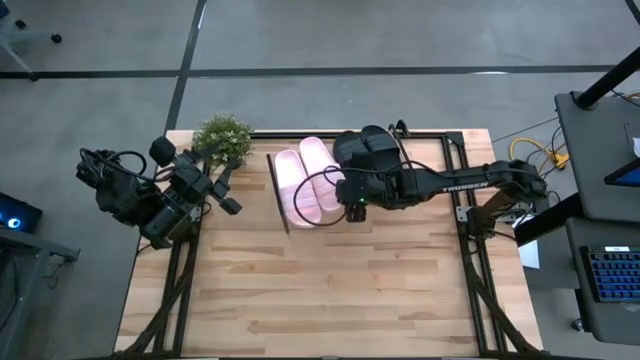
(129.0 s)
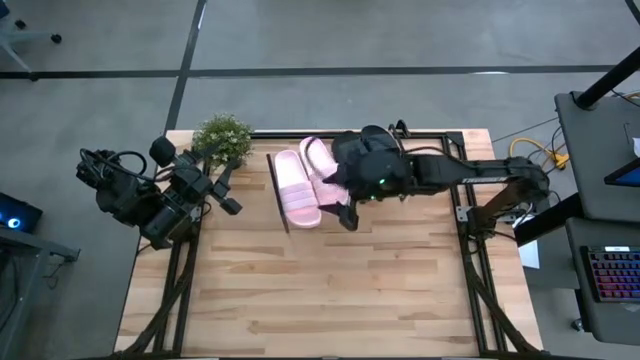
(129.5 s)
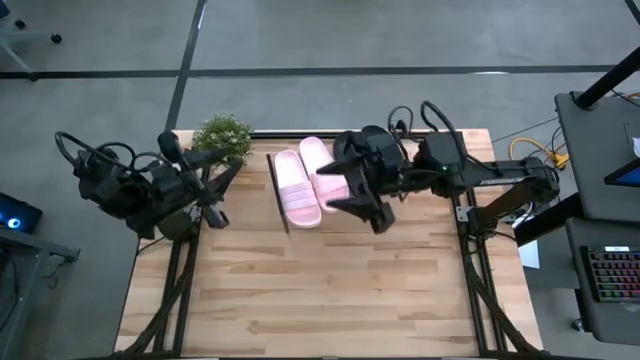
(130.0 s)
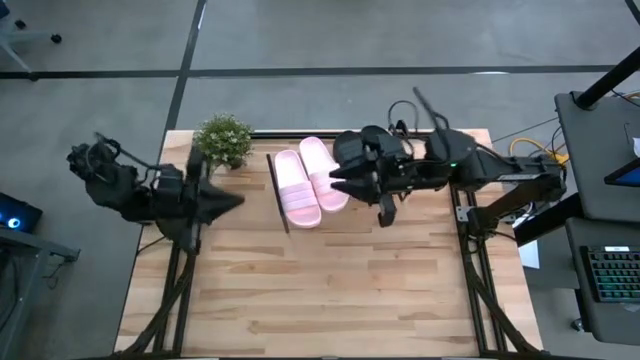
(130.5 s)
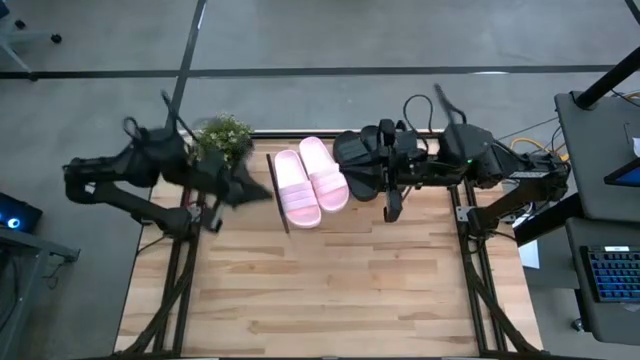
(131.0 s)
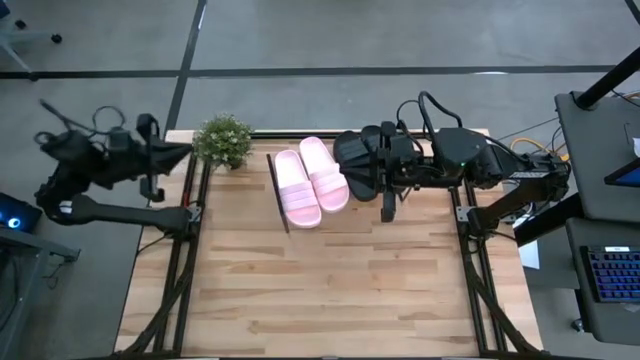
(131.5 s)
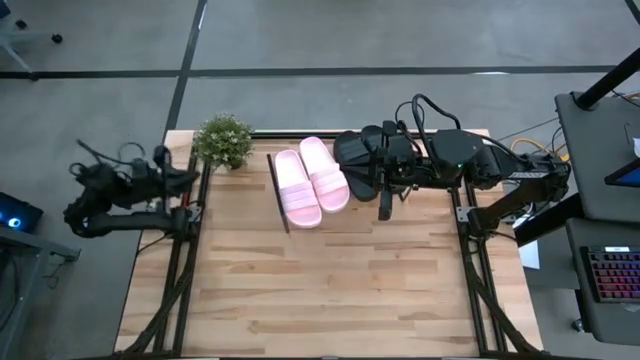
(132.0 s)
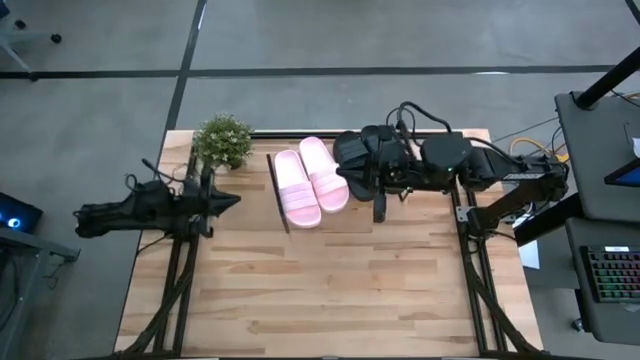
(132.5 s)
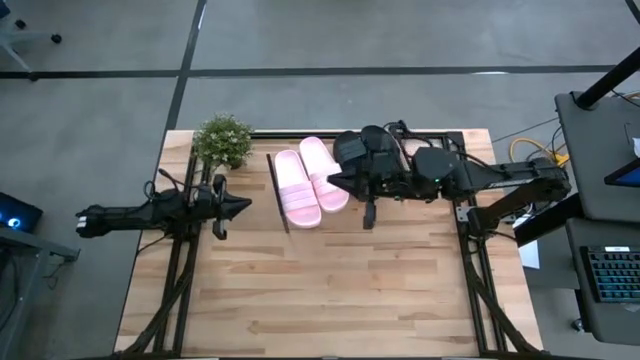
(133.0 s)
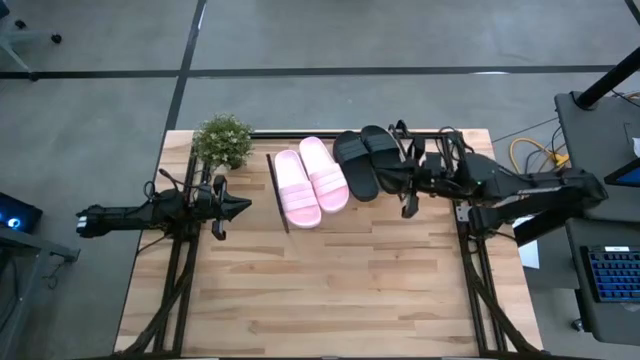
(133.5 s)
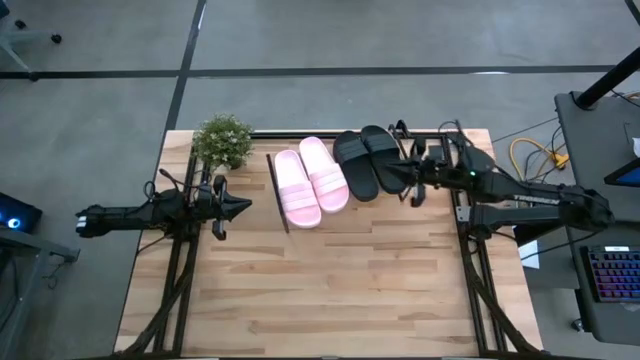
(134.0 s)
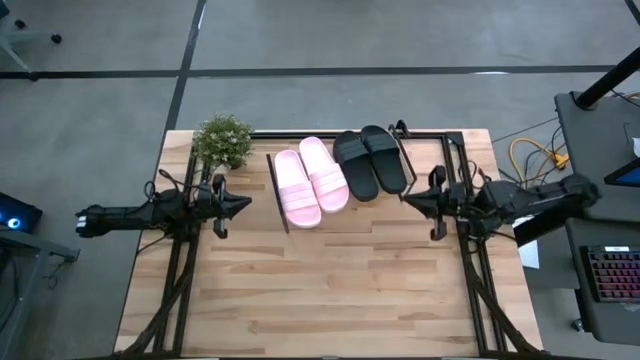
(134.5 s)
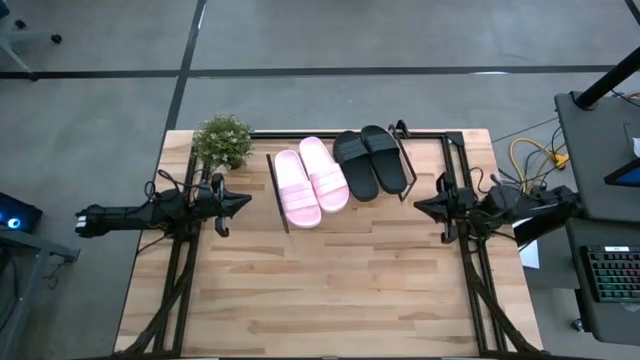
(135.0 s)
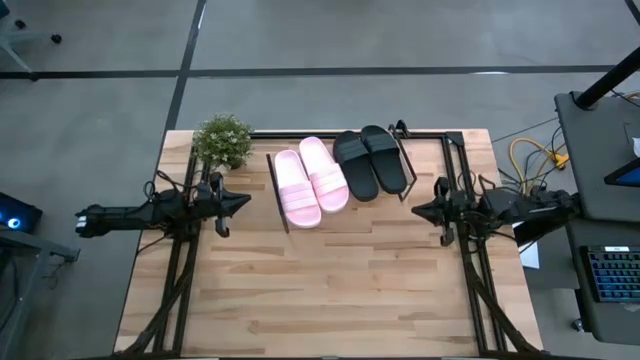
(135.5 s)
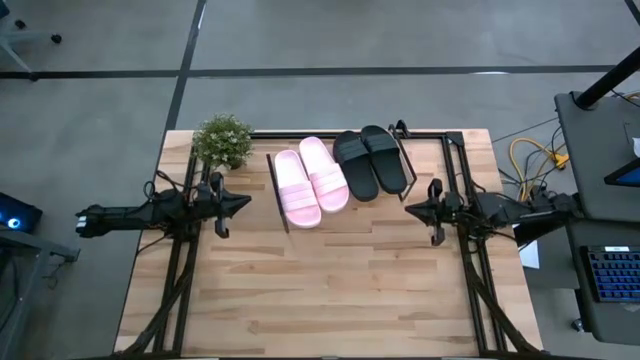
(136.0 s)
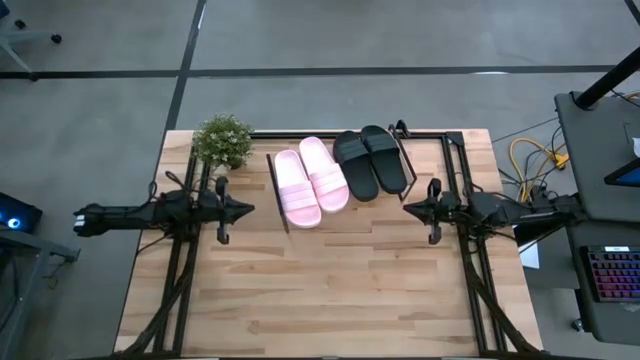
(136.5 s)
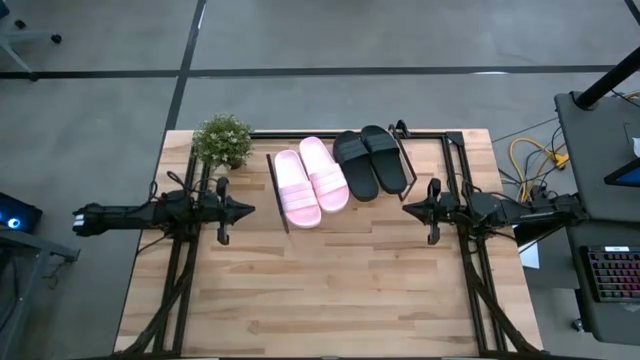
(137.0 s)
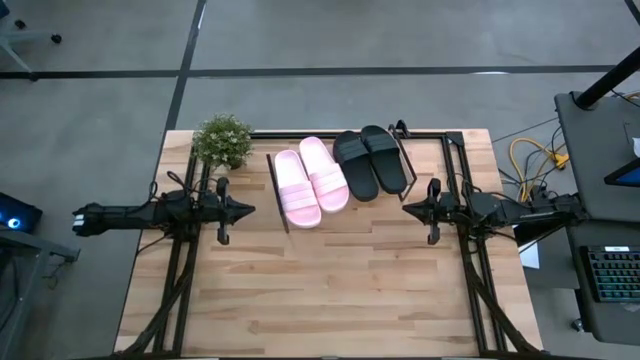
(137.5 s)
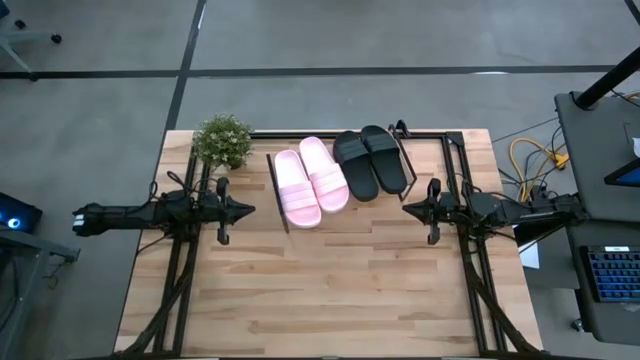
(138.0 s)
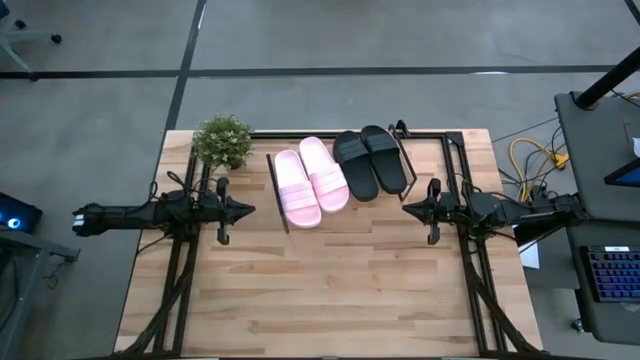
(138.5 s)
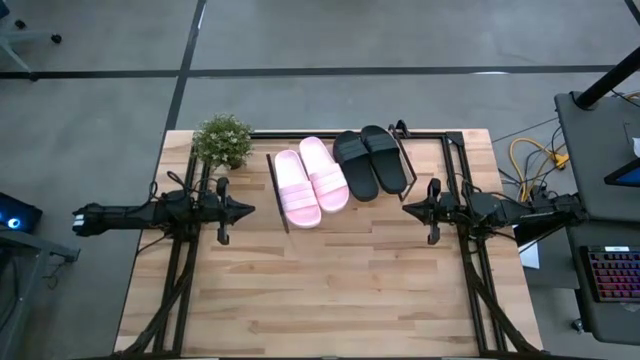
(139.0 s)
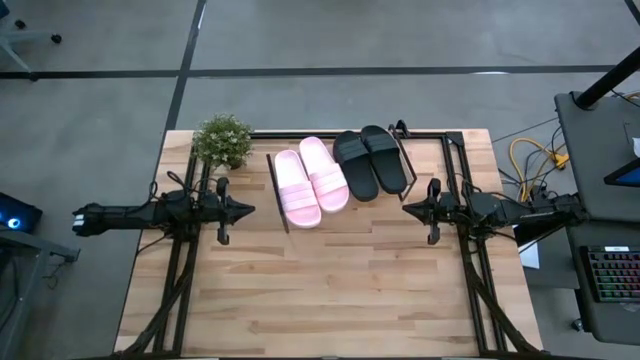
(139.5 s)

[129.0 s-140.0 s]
Task: Pick and place slides into the shelf
Return to Home Position

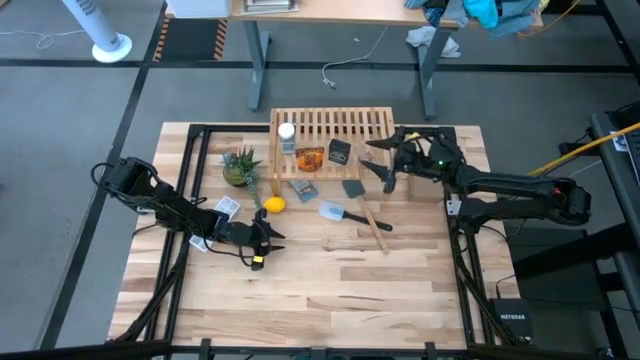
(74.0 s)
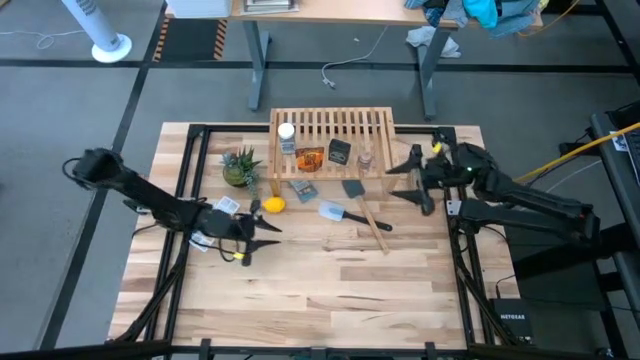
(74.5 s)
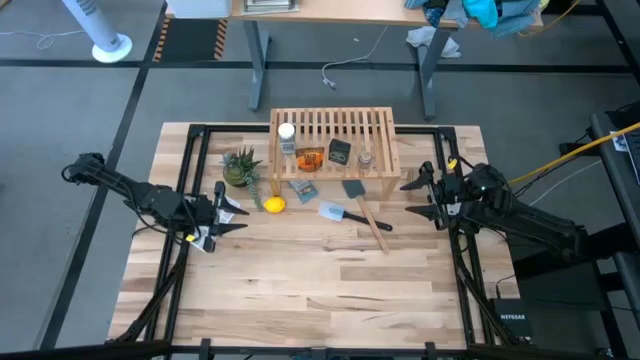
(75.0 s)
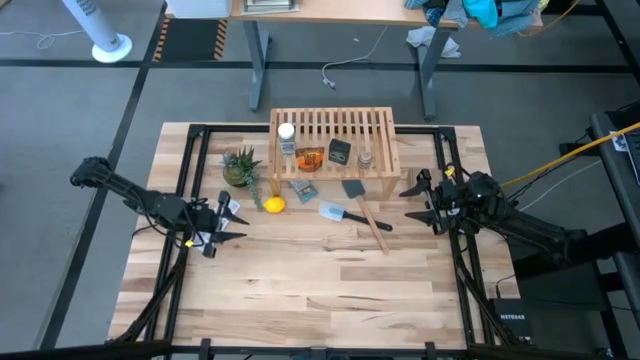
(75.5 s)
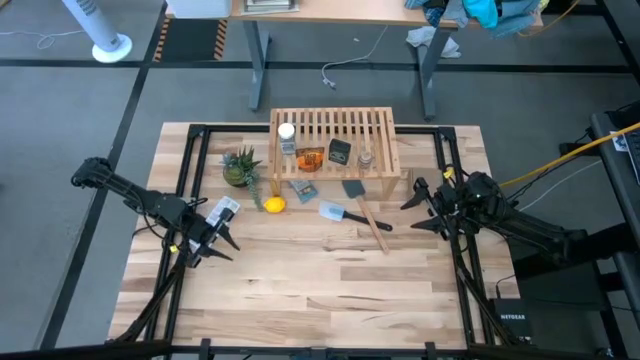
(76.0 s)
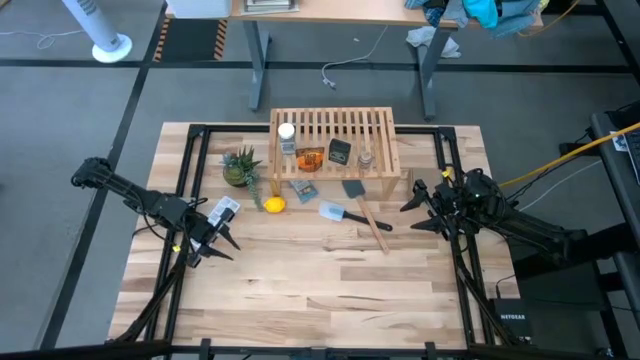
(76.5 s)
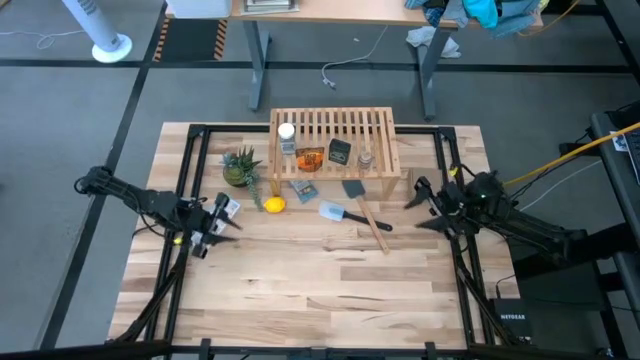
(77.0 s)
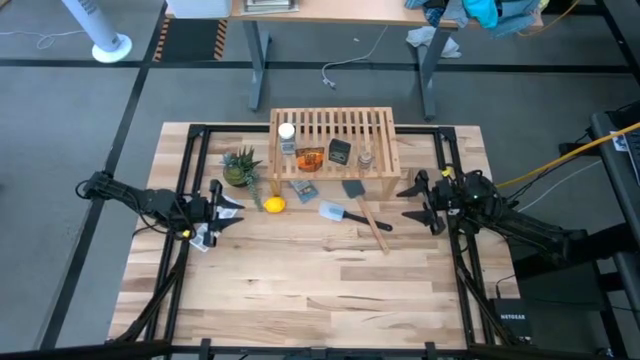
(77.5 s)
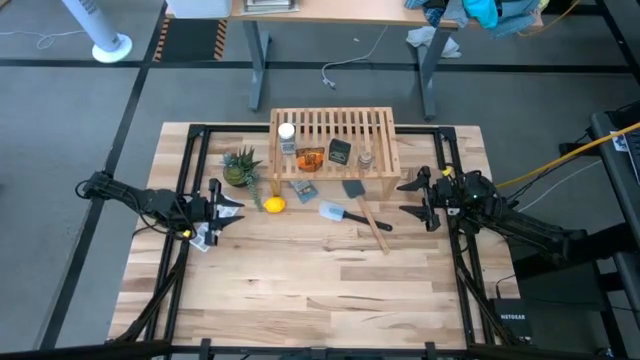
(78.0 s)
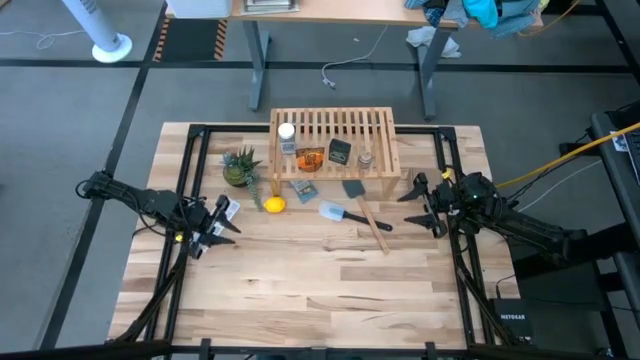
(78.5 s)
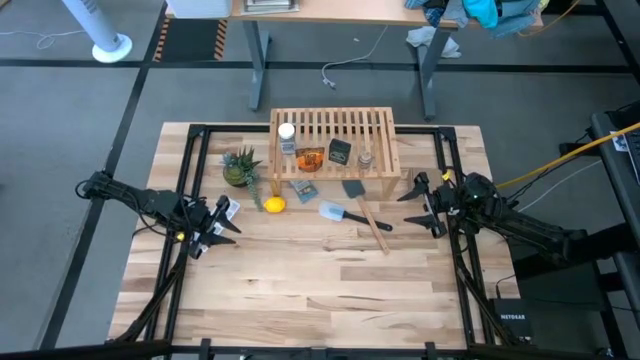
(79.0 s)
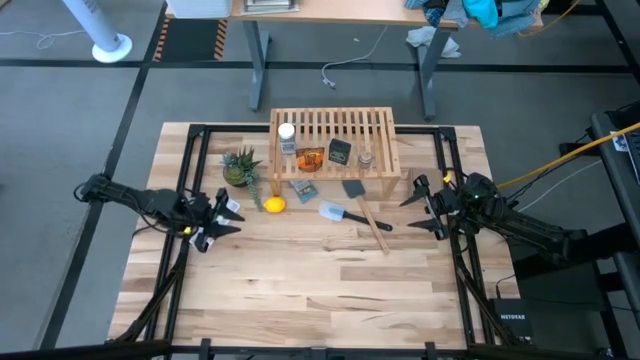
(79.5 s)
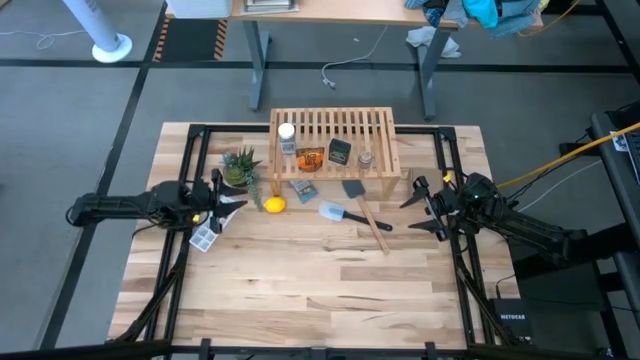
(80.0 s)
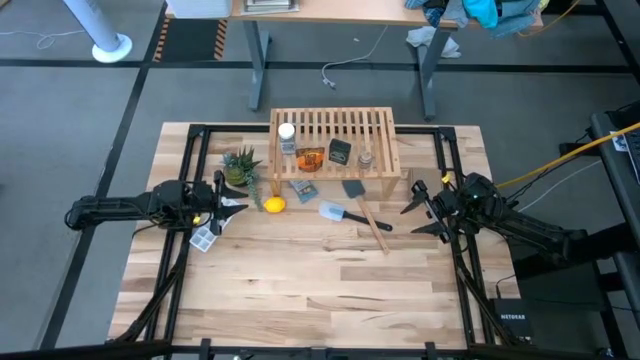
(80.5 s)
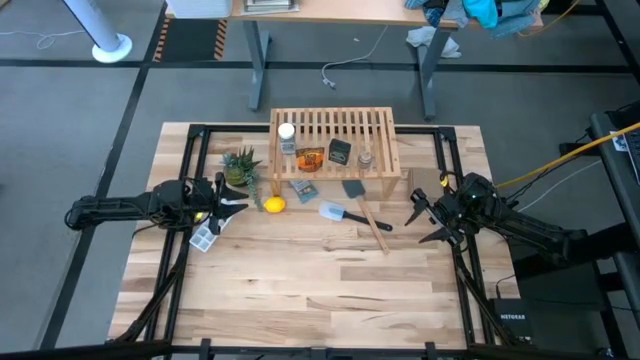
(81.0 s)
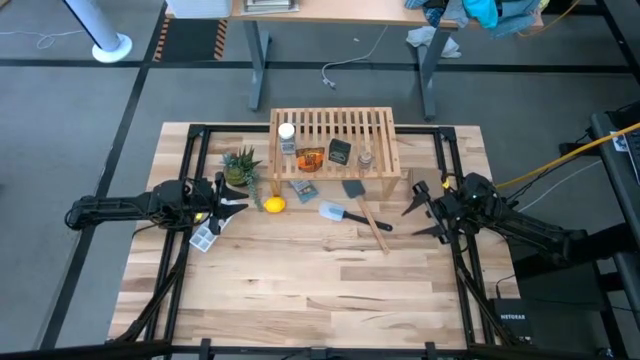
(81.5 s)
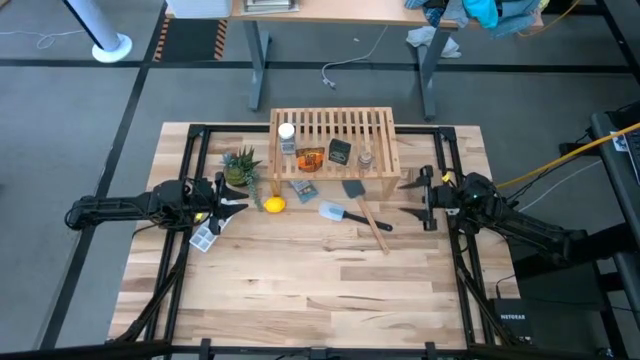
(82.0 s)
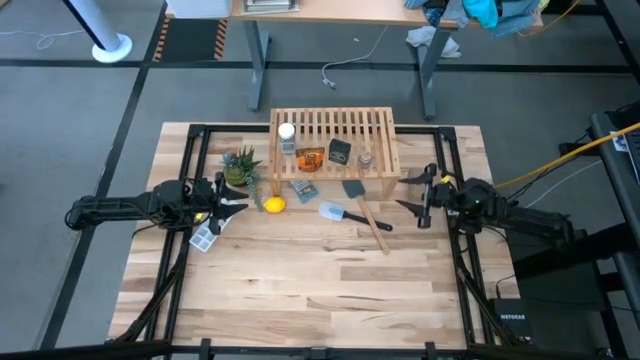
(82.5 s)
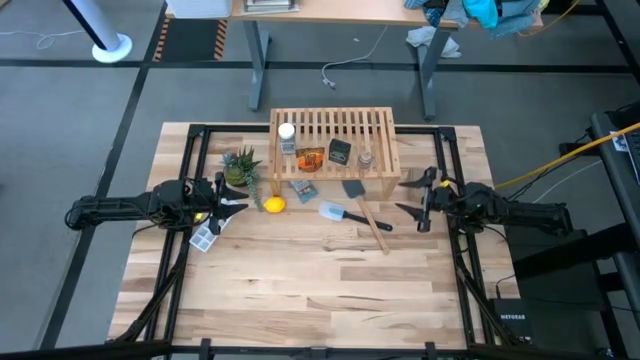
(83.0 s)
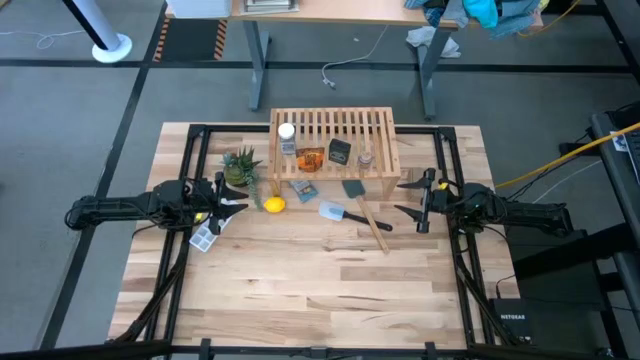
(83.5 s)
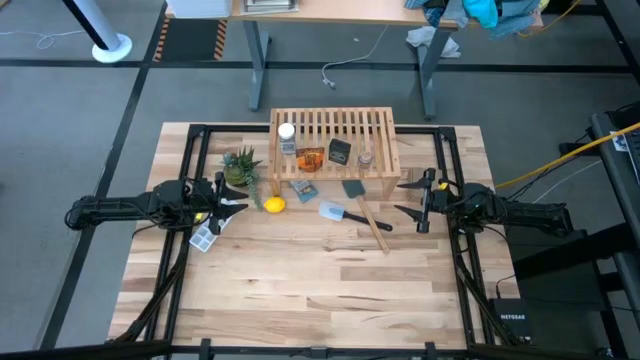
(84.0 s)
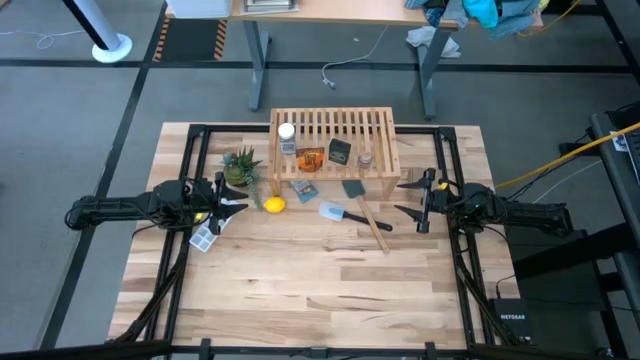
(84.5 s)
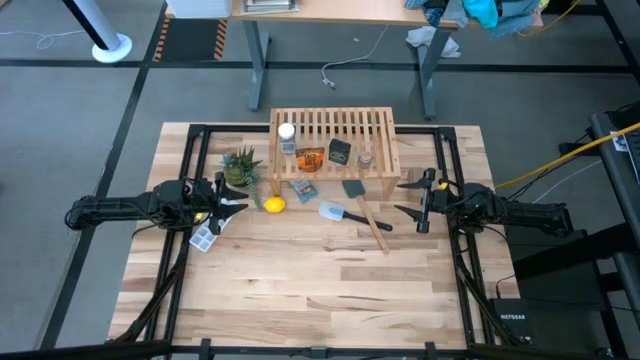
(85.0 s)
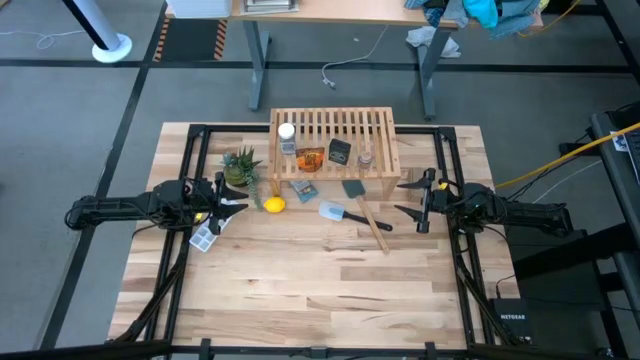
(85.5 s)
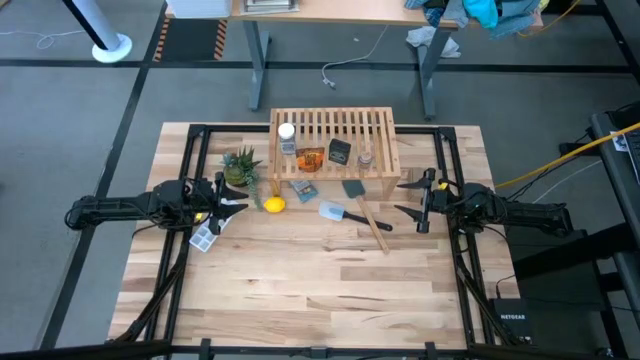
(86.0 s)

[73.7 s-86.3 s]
Task: Shelf spices
Return to Home Position
